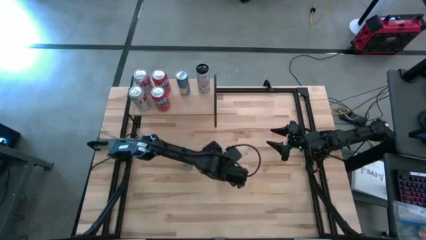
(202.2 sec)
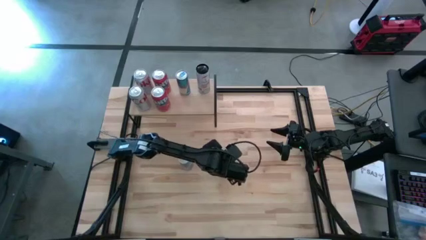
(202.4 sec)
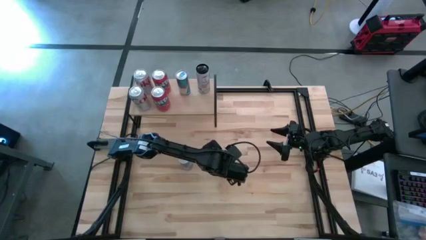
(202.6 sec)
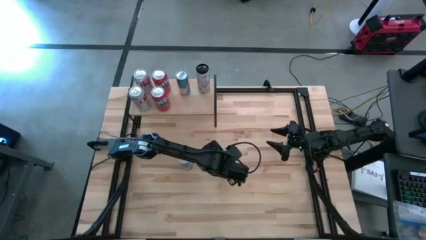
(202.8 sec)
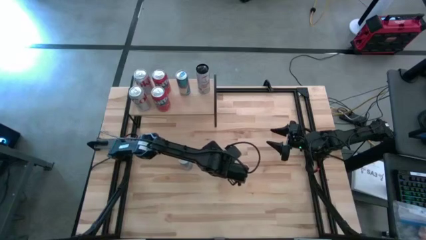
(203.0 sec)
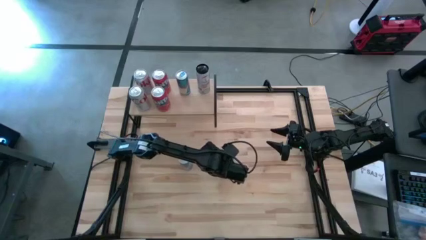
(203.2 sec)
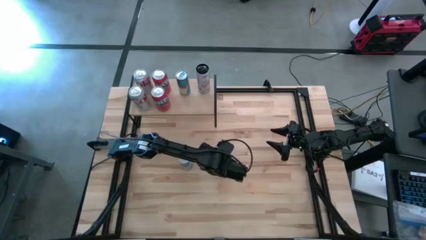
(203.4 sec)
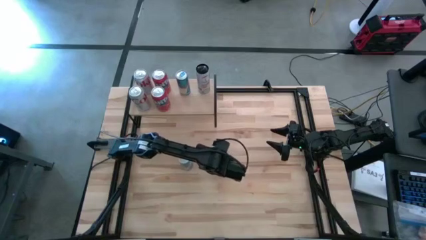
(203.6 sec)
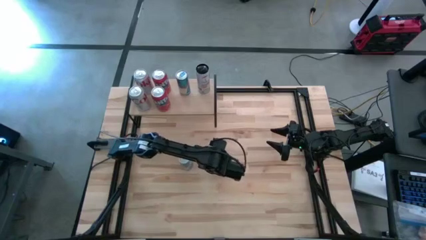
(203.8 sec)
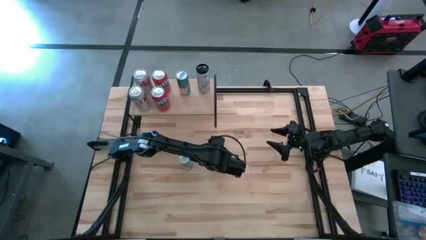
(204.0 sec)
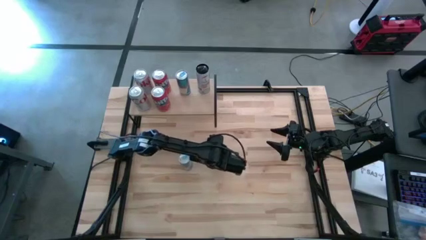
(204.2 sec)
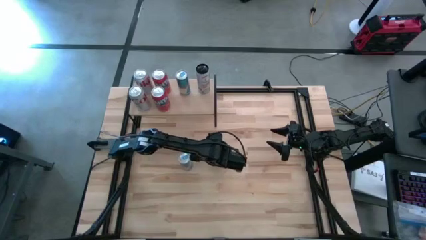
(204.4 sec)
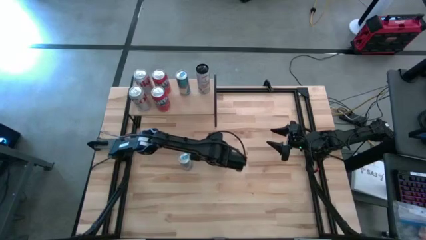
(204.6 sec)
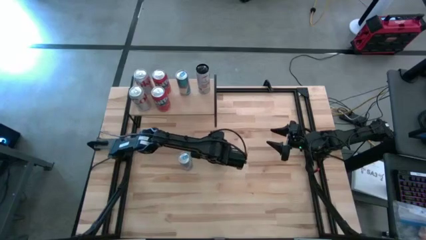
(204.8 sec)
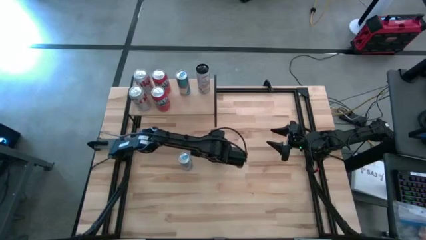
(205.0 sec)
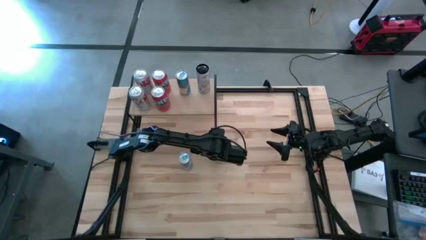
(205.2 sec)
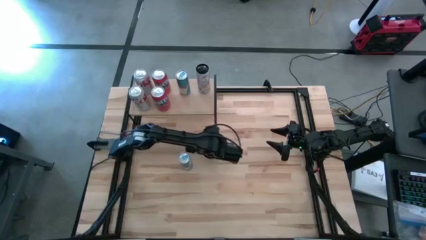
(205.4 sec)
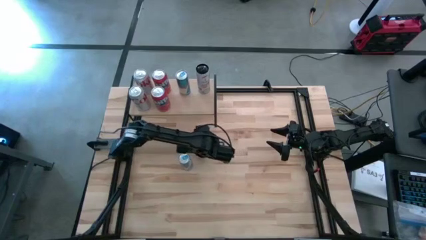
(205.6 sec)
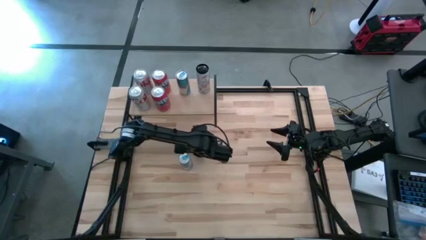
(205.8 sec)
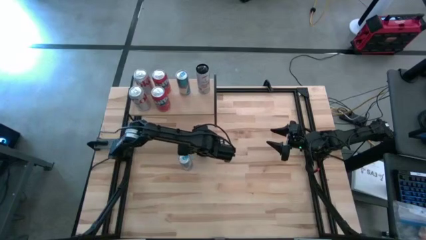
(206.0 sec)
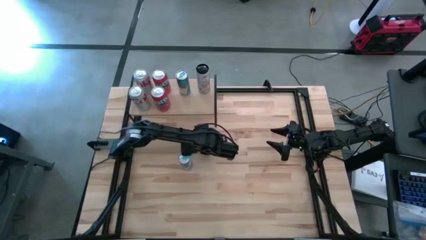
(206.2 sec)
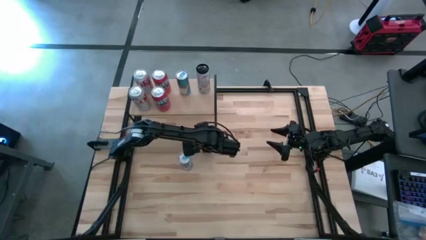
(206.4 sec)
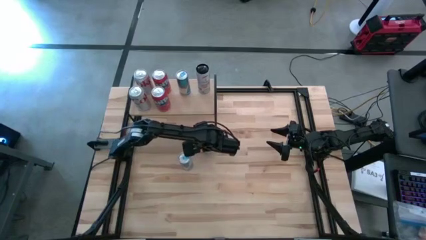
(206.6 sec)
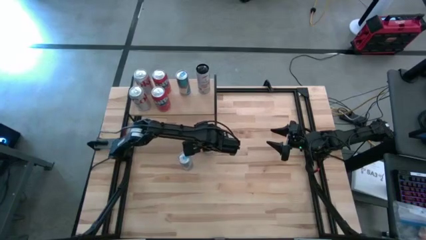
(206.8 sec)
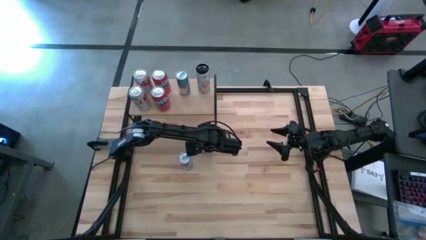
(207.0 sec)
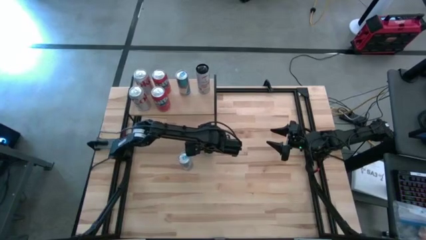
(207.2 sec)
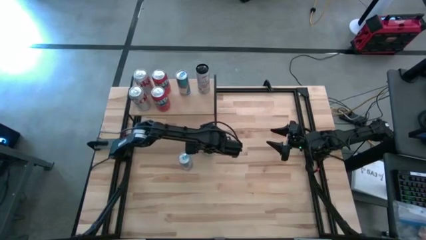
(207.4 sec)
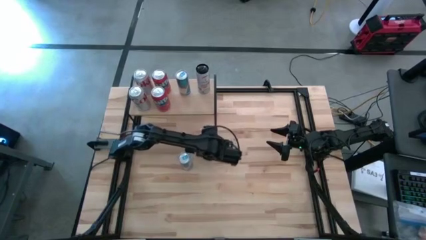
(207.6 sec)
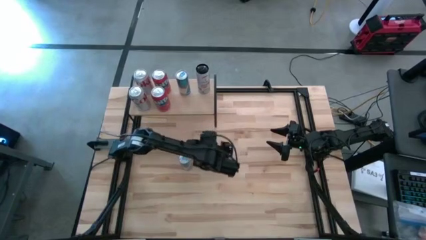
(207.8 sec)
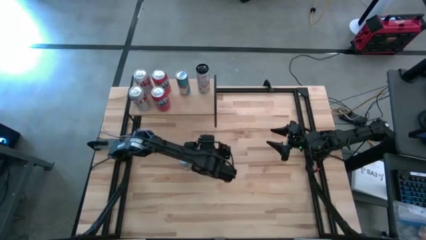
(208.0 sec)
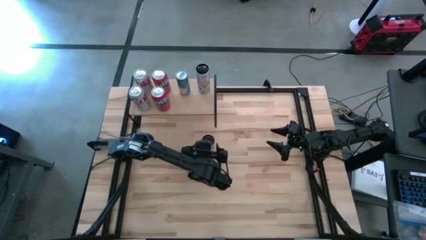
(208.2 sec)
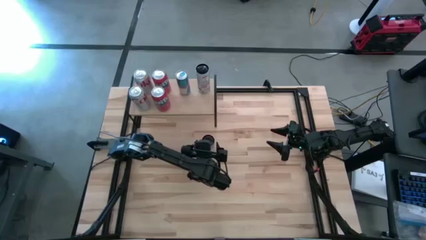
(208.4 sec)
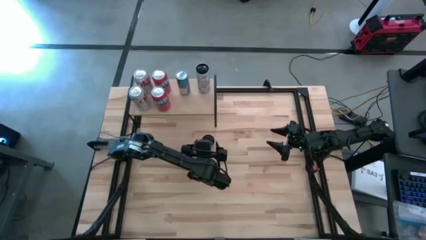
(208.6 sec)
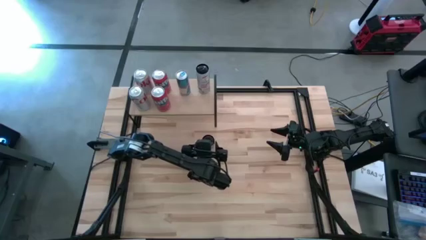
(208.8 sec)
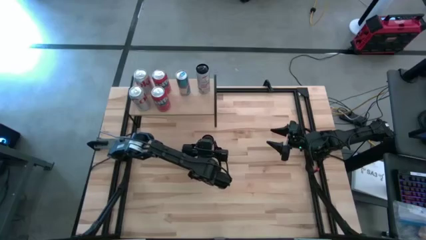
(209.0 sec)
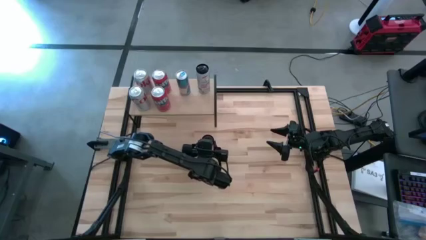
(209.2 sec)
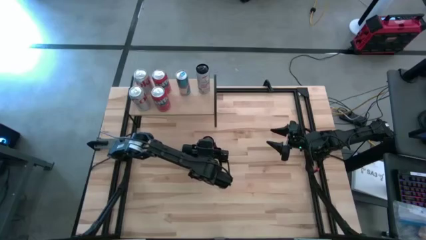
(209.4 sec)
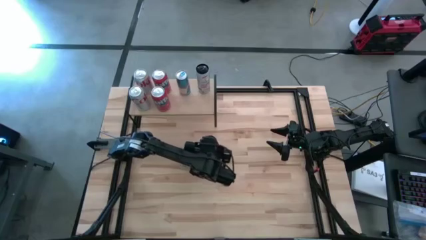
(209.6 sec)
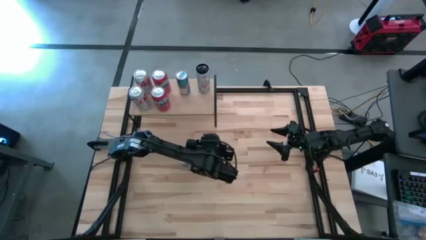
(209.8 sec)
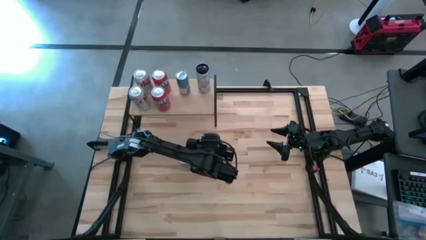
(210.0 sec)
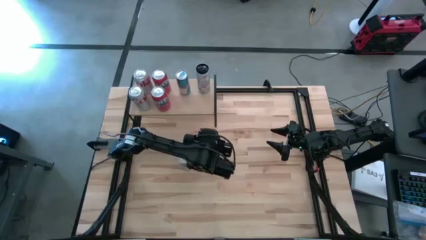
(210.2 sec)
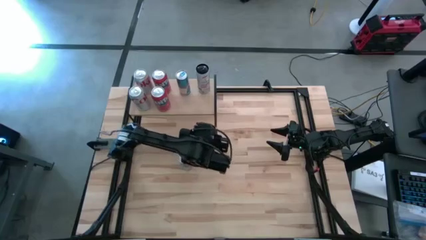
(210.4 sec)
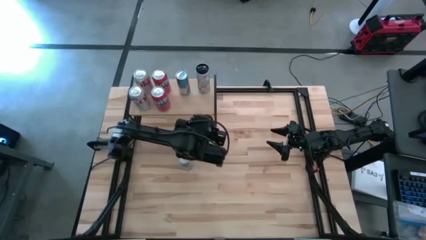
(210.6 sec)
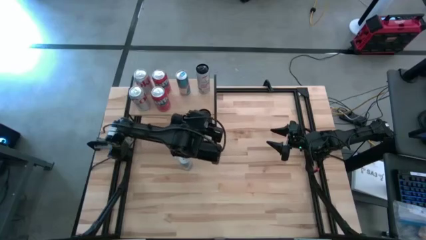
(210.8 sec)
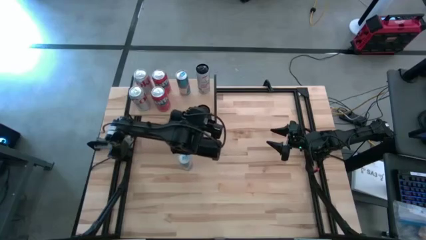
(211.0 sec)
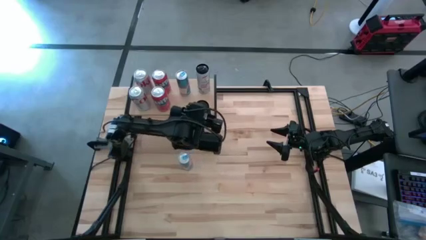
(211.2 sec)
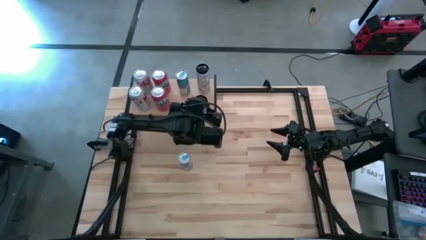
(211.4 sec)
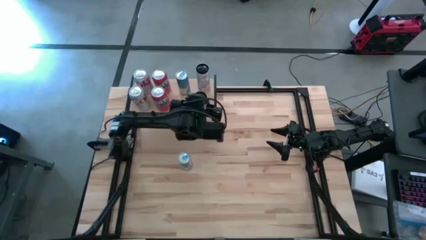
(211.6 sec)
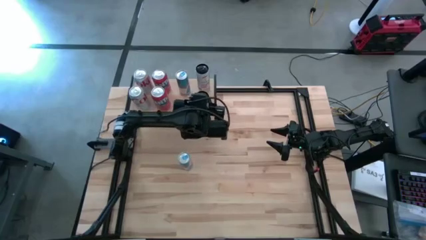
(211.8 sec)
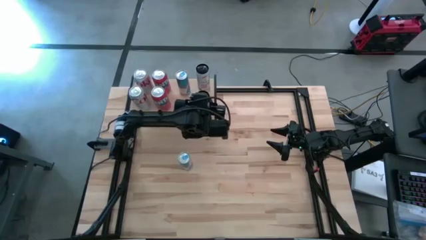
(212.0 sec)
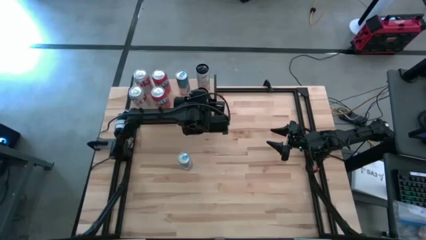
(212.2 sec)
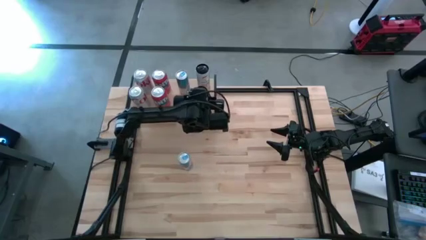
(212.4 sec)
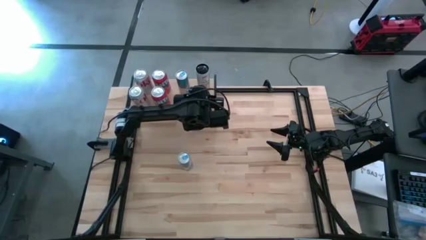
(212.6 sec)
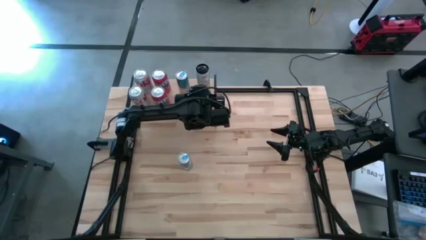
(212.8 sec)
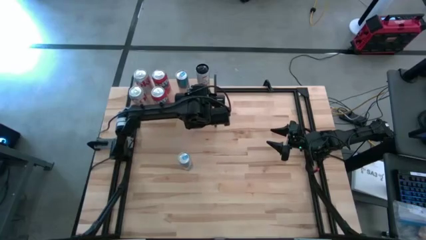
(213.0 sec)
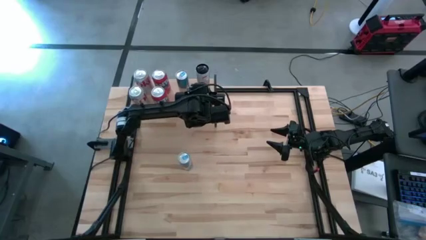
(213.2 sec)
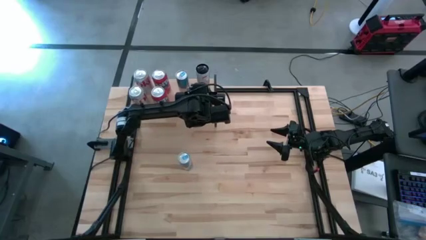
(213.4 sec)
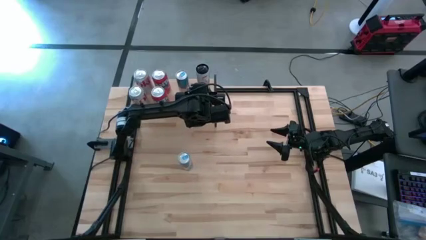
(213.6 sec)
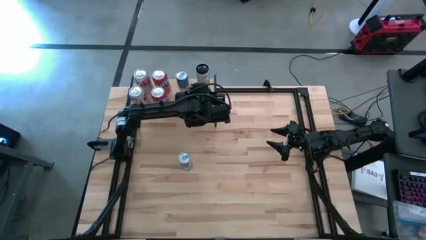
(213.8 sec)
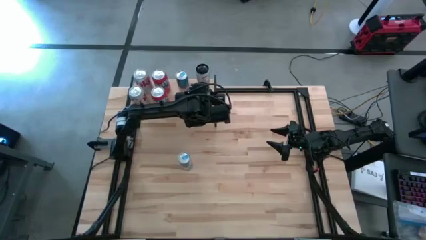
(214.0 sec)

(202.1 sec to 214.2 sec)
Task: Place canned beverage on shelf
Put the white and pink soda can align the with the other white and pink soda can on the shelf

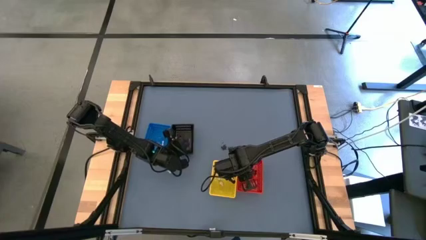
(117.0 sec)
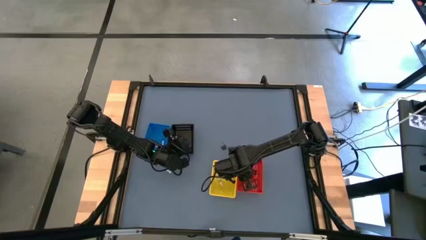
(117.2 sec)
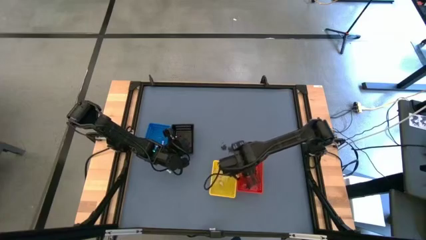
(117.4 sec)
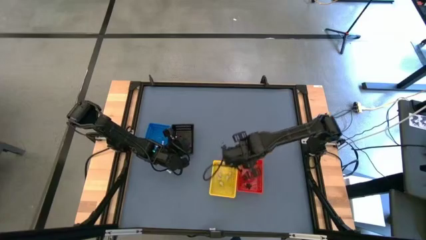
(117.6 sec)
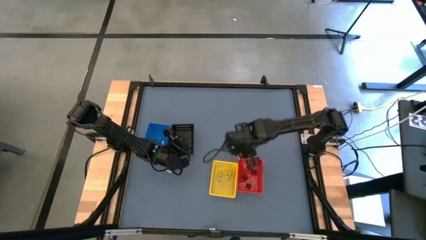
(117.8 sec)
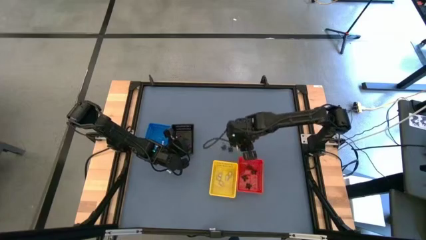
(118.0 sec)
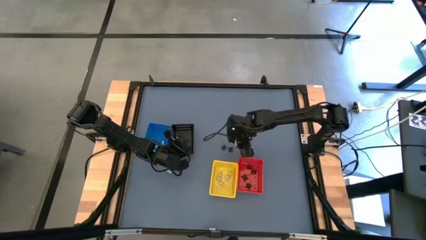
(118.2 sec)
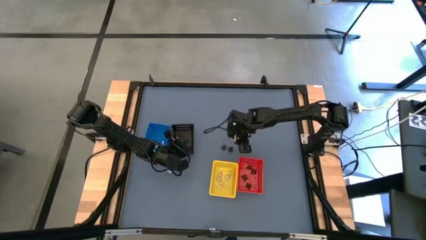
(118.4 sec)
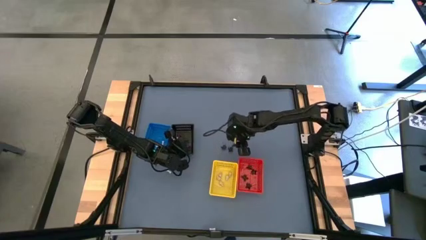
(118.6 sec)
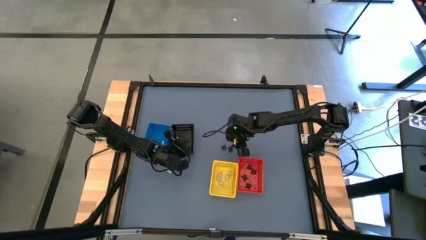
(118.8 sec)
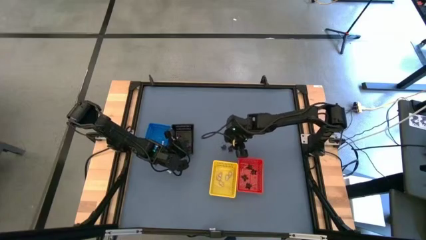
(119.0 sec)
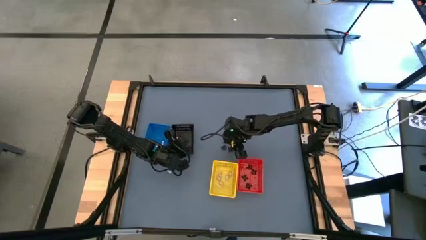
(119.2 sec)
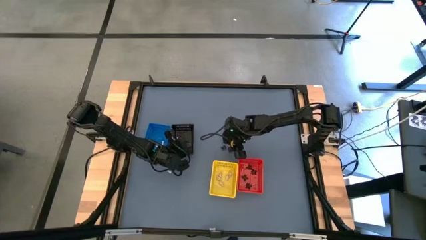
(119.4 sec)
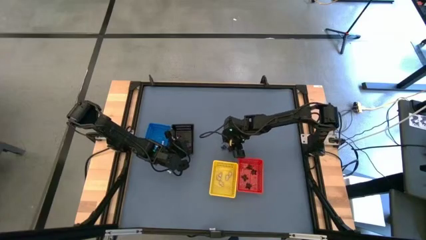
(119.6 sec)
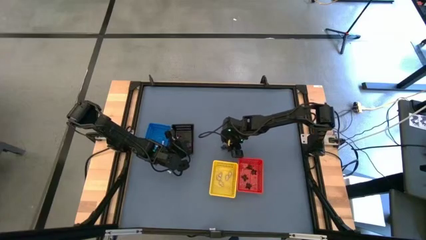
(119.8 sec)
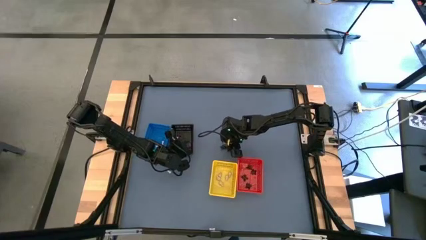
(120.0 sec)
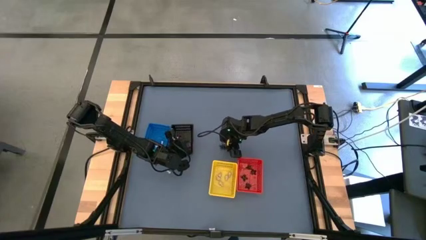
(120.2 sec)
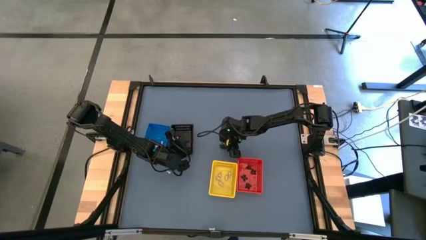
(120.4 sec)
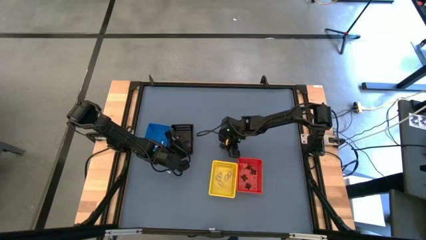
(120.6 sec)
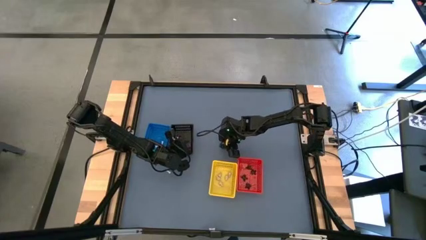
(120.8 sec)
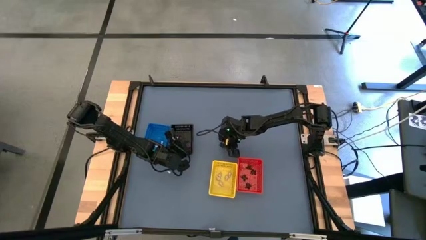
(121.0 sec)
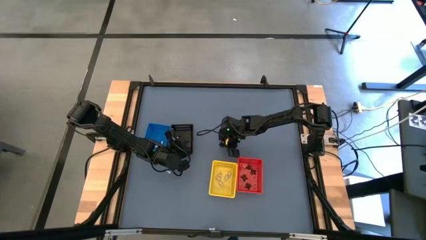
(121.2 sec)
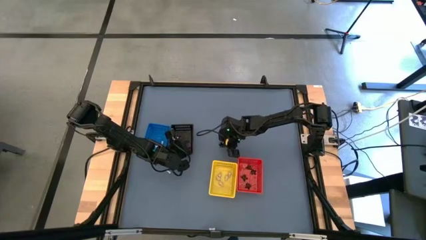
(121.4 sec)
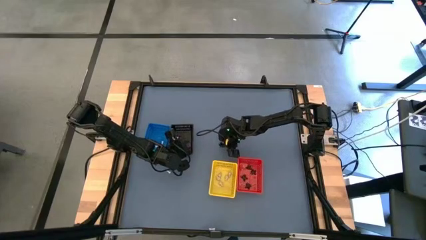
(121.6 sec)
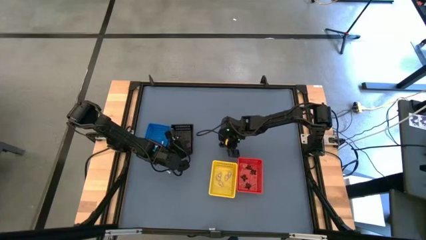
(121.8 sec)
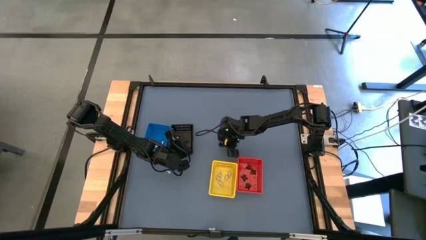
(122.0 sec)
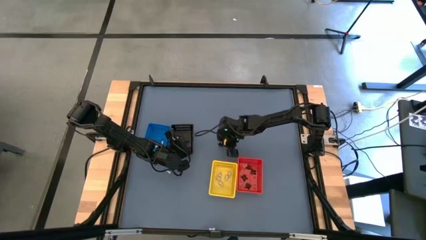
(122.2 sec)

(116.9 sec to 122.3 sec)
Task: Sort Halloween decoration
Put the spider toy into the red bin
